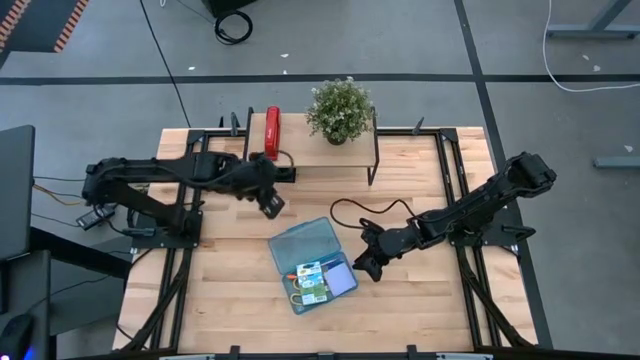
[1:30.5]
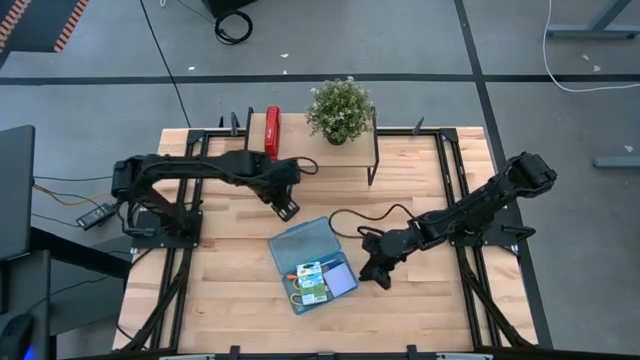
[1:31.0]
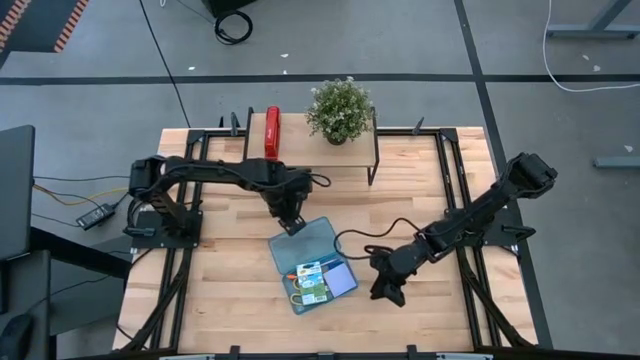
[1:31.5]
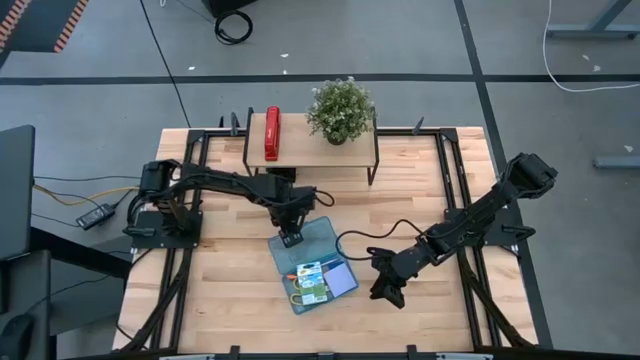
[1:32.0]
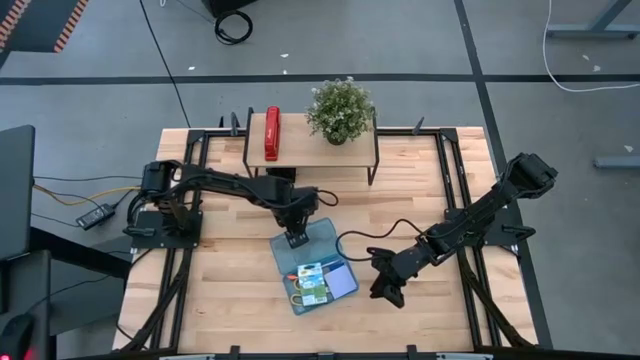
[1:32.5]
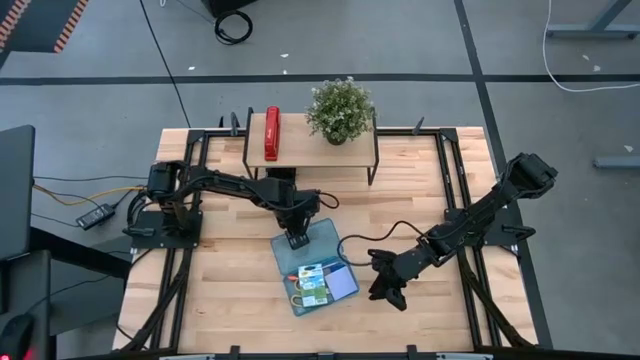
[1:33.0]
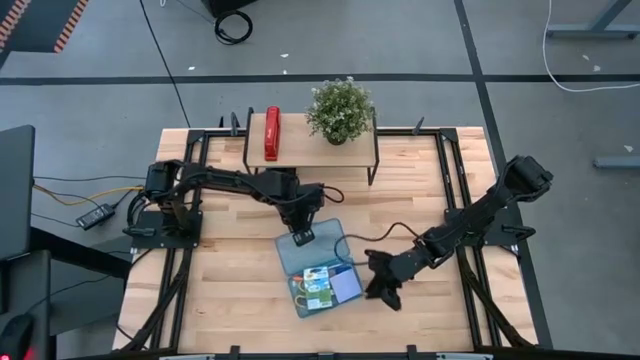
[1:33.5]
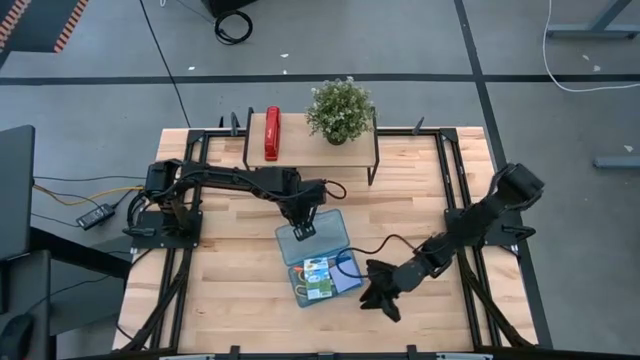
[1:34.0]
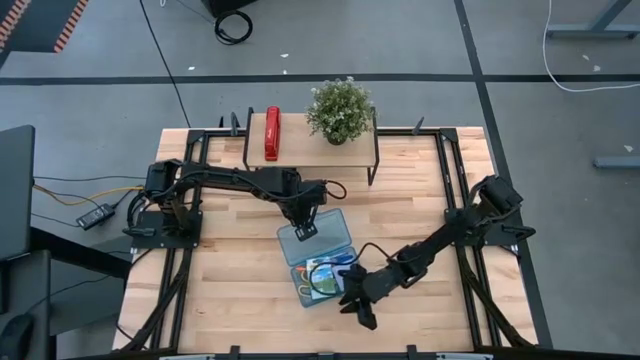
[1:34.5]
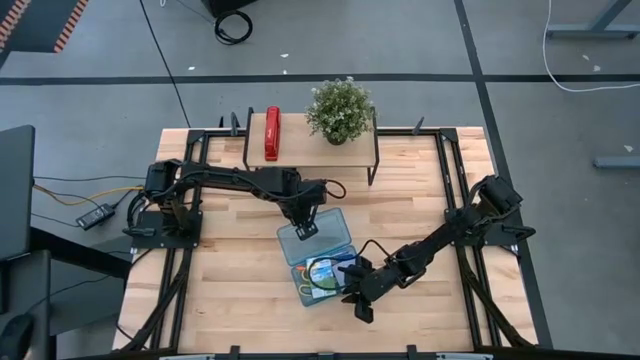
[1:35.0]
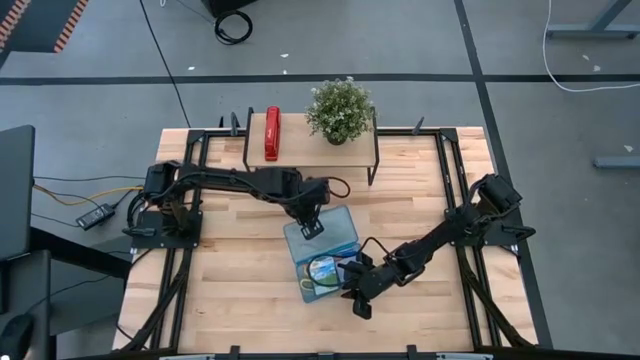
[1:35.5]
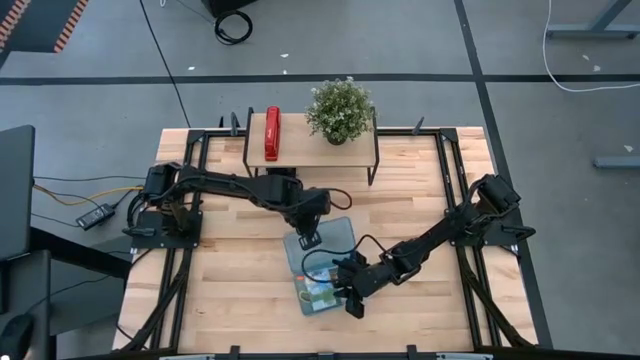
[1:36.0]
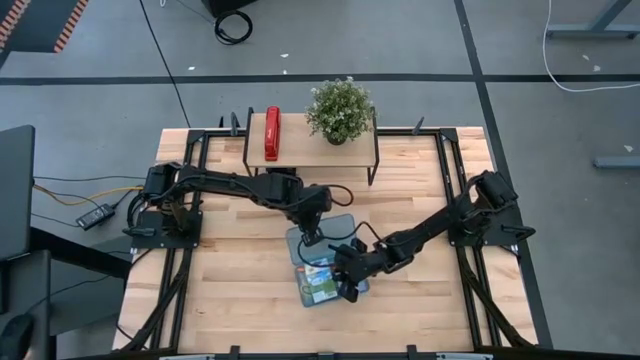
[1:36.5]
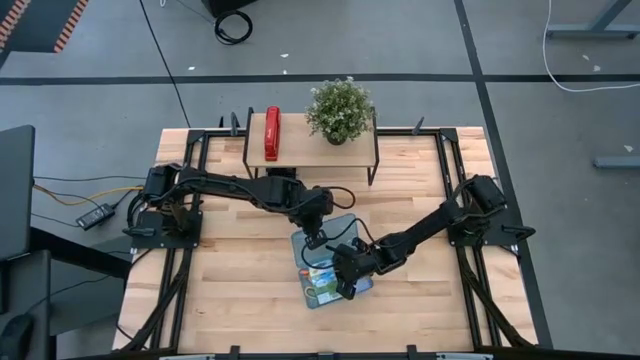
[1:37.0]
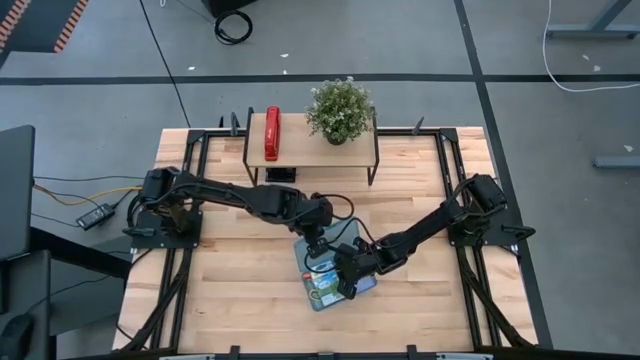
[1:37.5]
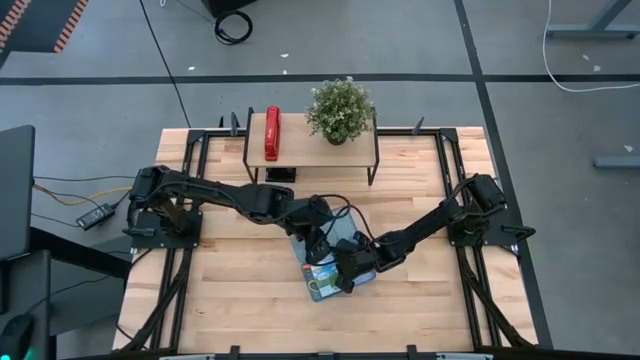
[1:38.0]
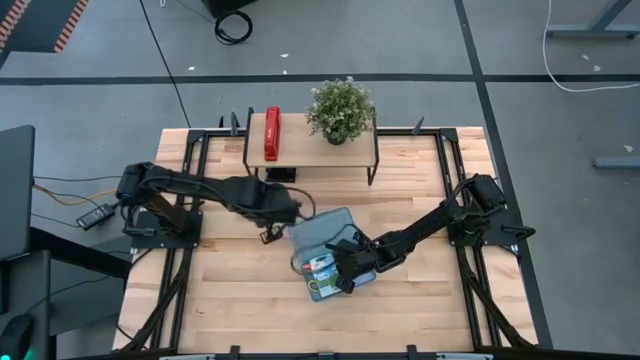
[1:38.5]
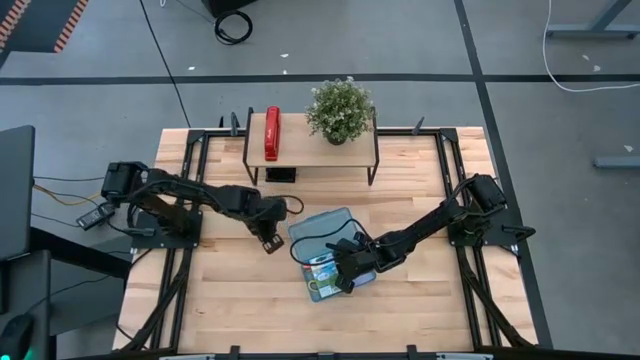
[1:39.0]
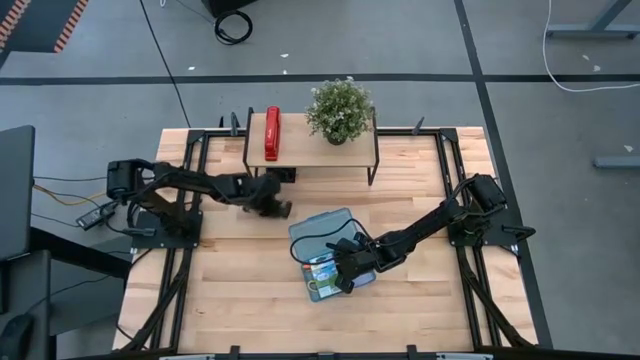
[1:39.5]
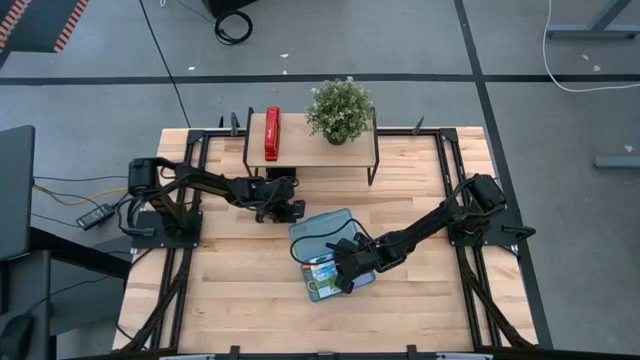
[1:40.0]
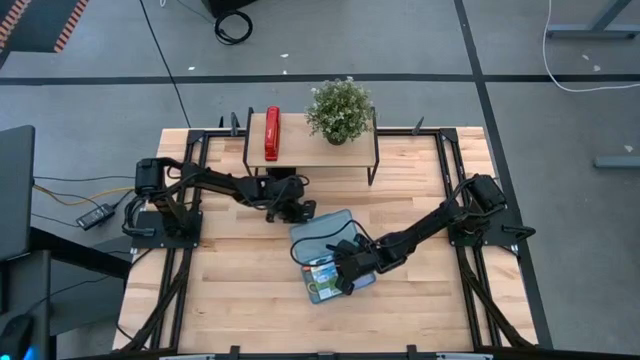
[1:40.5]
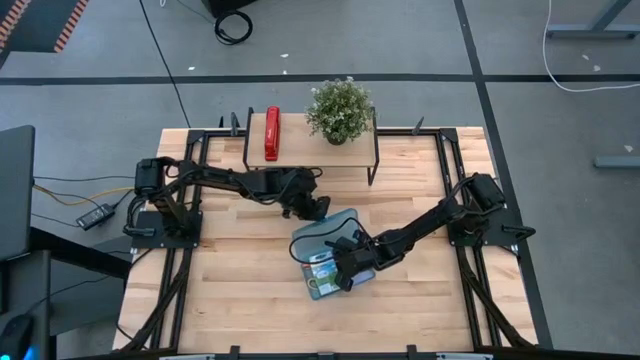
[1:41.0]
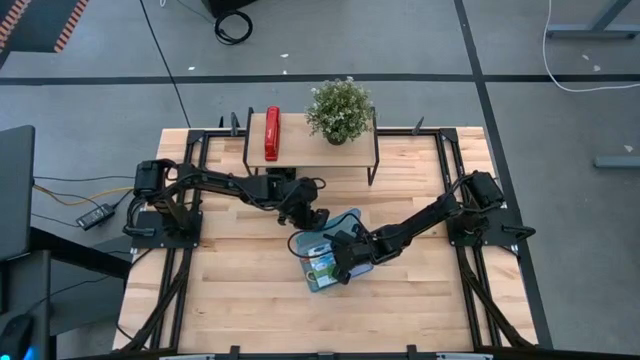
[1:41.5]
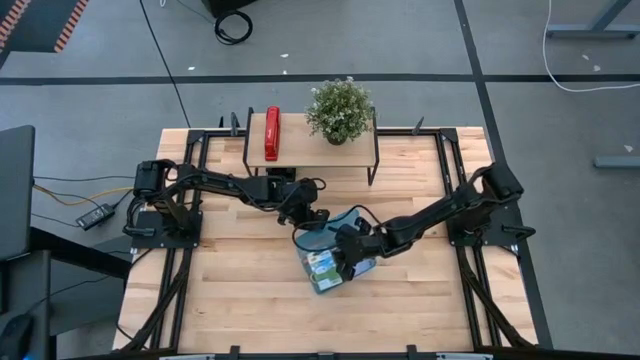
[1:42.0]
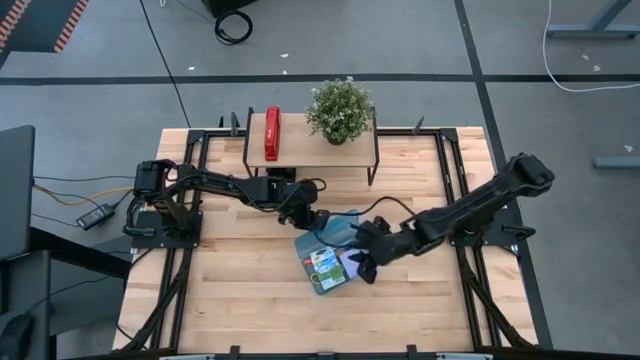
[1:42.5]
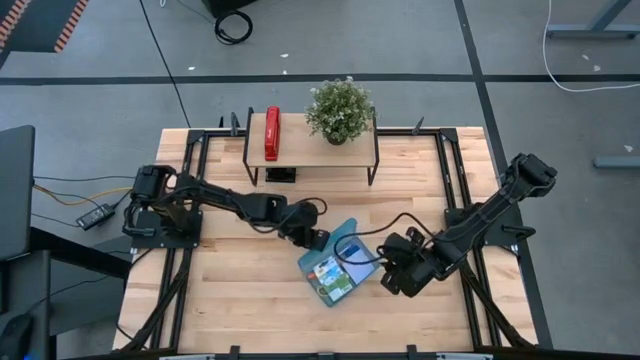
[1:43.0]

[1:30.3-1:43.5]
Task: Pack school essentials
Close the blue supply box

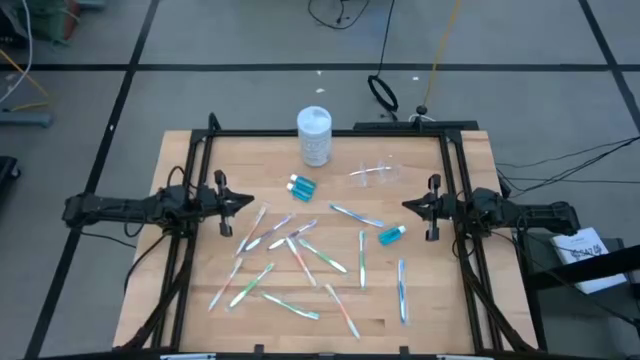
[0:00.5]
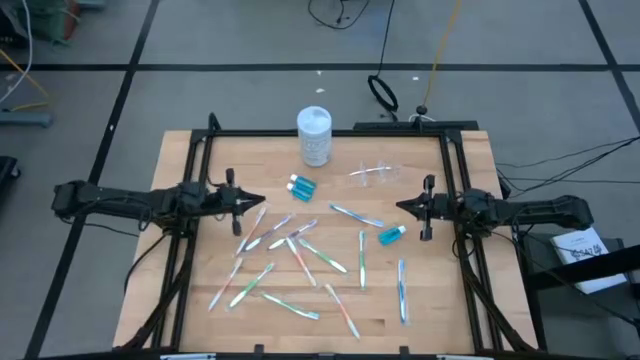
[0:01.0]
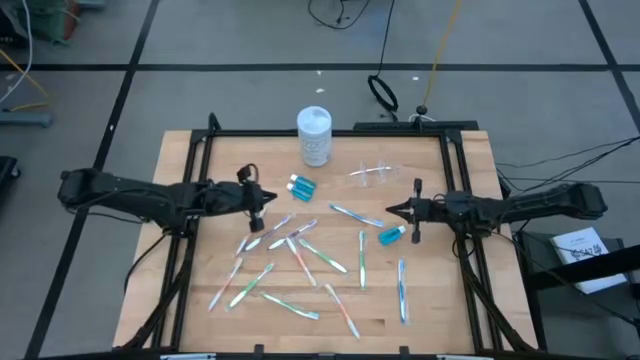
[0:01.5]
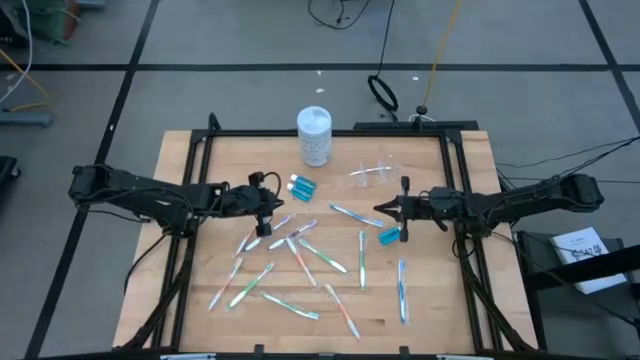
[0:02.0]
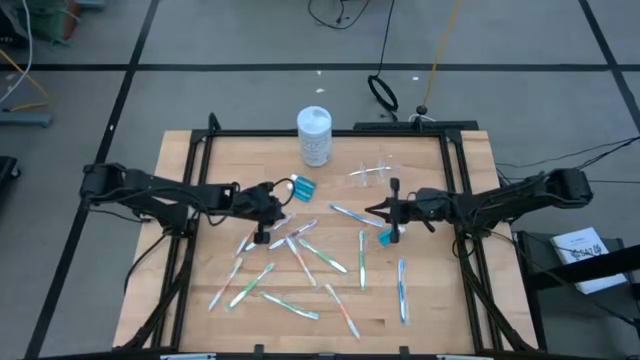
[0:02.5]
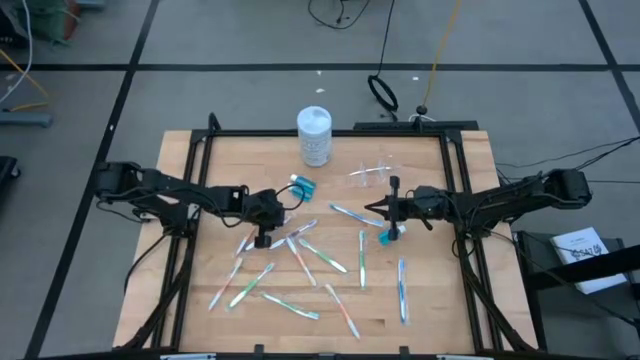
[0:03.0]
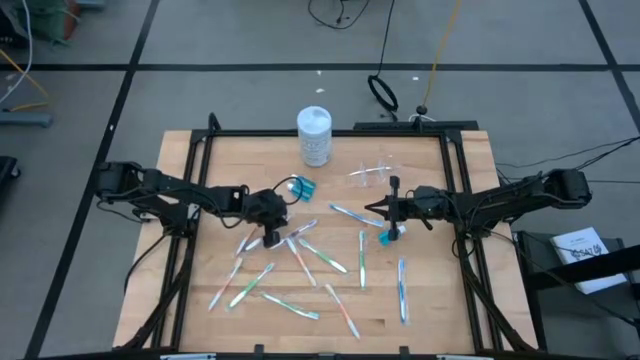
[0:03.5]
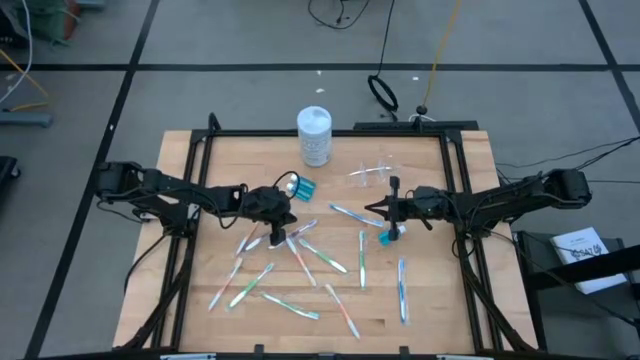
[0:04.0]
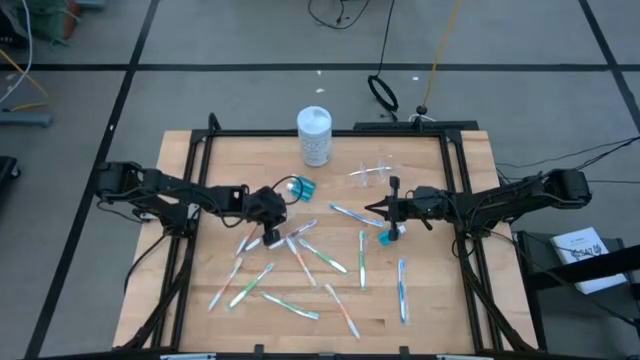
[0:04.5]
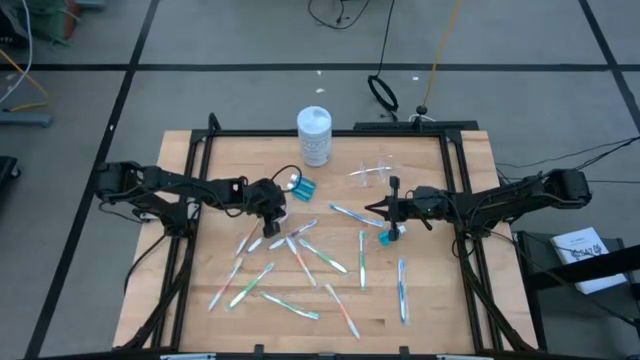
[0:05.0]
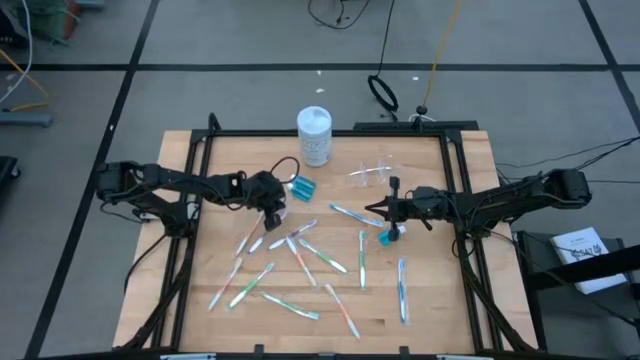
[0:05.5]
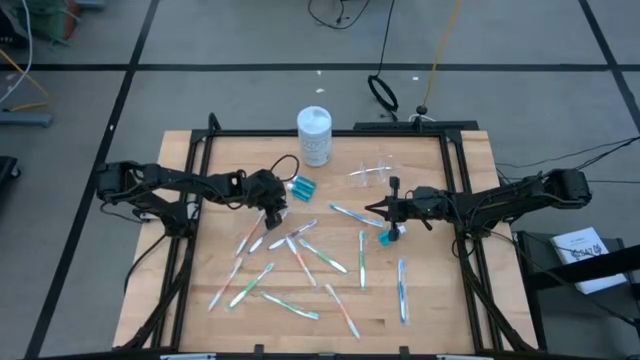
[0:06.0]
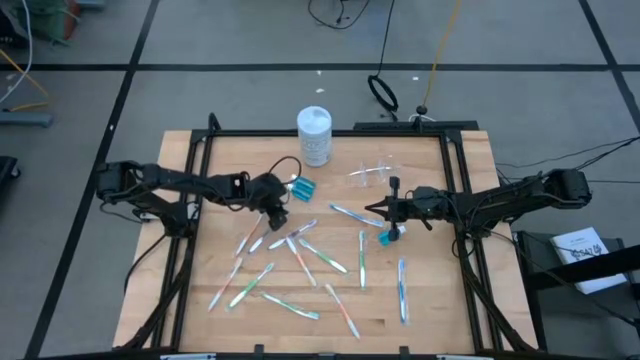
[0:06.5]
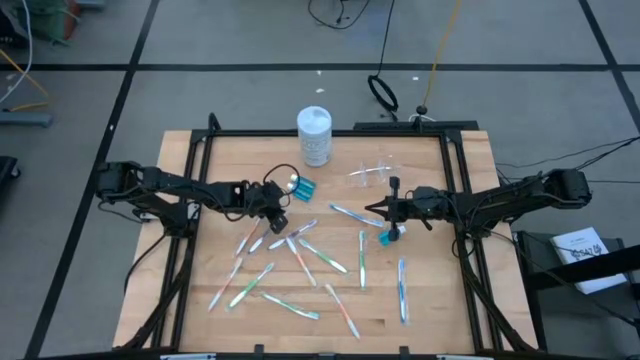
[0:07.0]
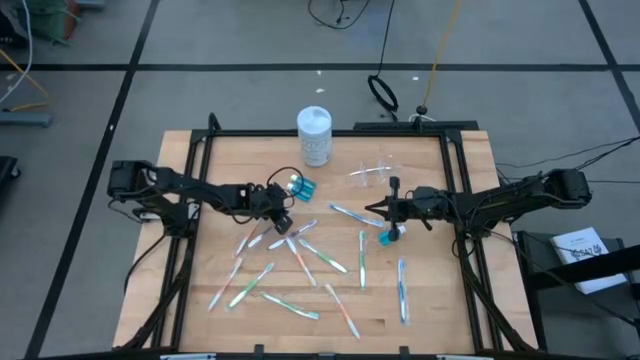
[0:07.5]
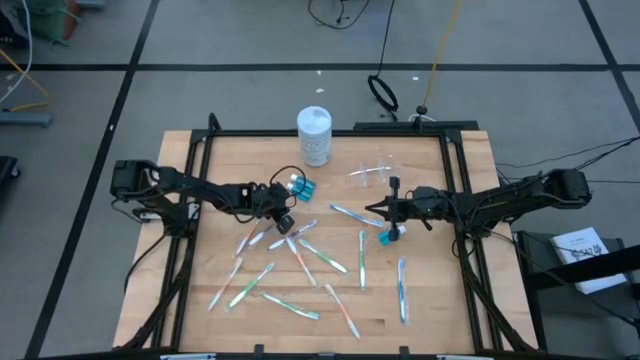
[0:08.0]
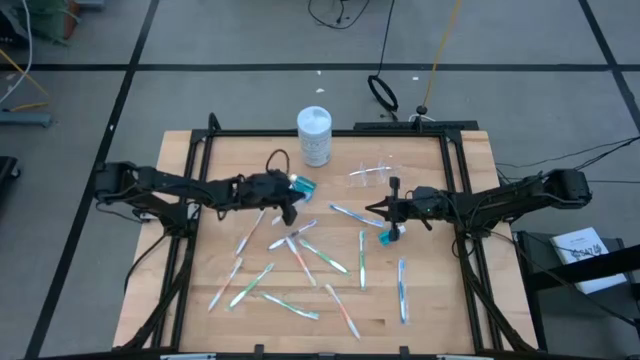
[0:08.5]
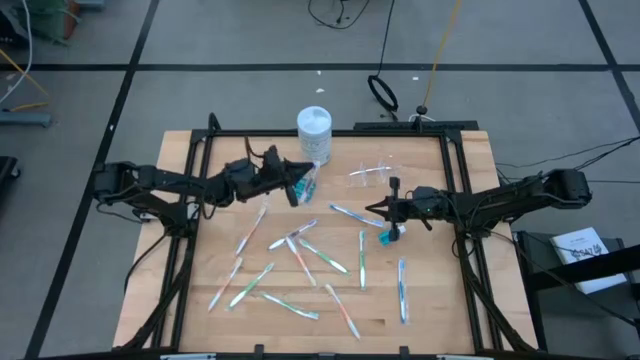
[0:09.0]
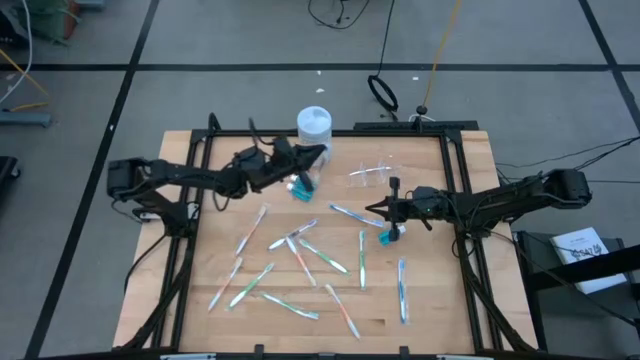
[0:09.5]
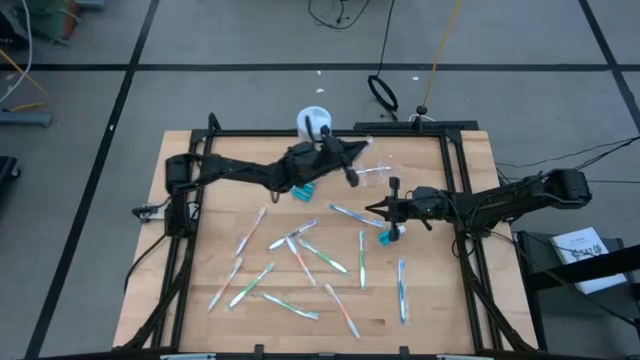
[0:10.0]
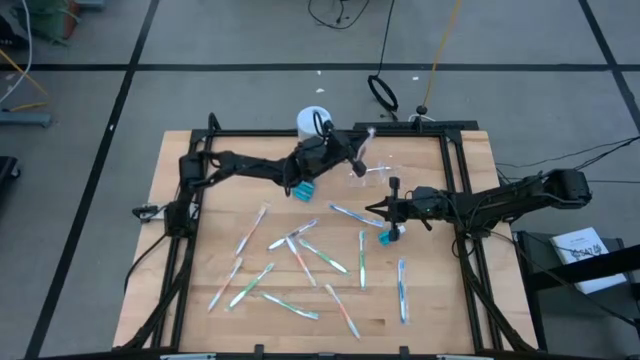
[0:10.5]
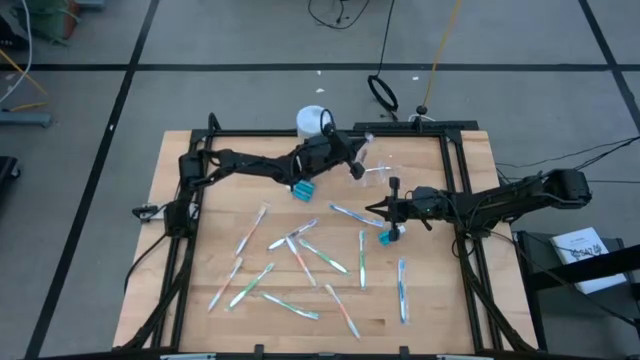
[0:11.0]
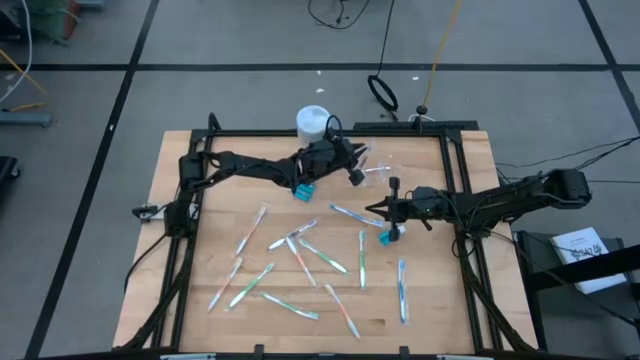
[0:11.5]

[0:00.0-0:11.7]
Task: Pick & Place toothbrushing station
Put the purple toothbrush into the transparent organizer
